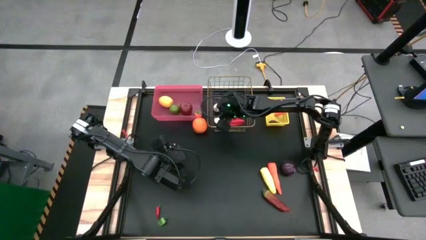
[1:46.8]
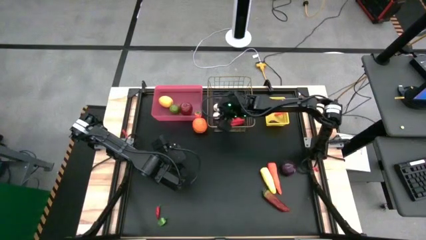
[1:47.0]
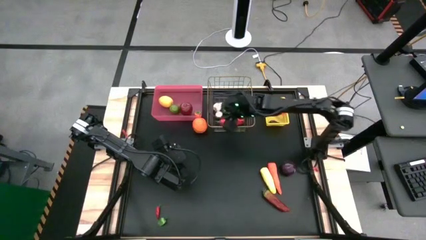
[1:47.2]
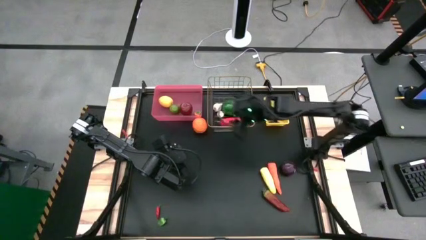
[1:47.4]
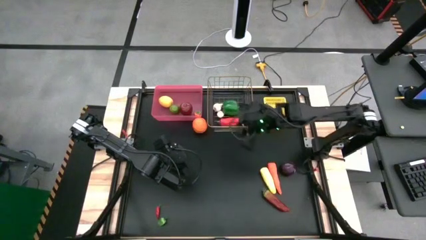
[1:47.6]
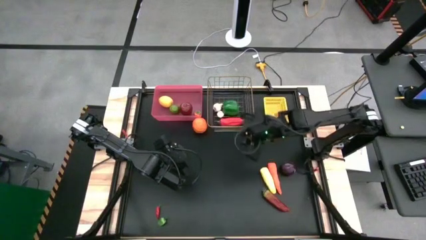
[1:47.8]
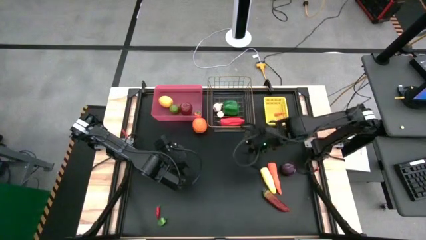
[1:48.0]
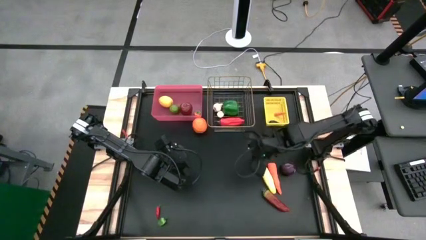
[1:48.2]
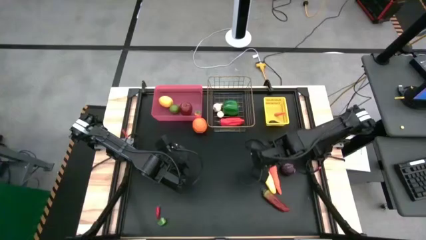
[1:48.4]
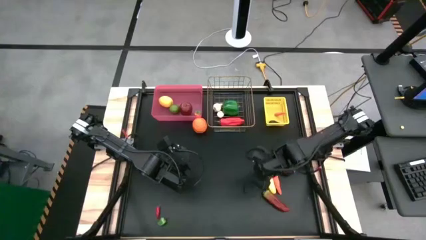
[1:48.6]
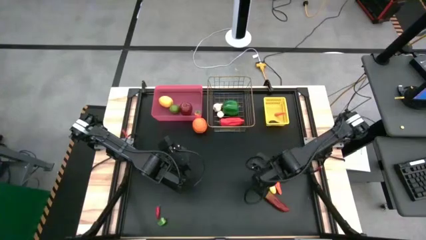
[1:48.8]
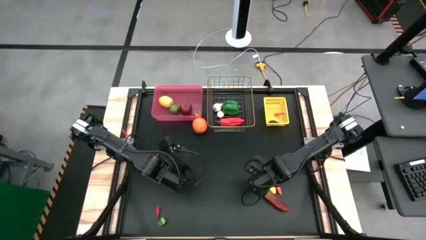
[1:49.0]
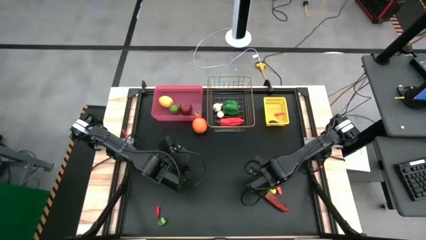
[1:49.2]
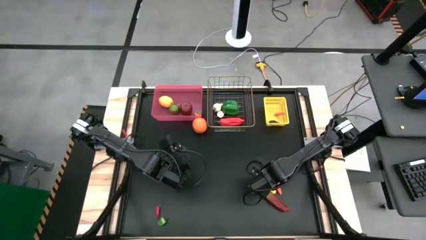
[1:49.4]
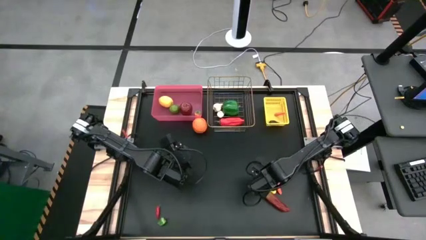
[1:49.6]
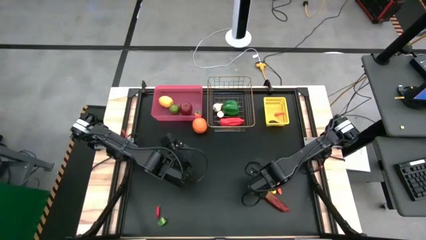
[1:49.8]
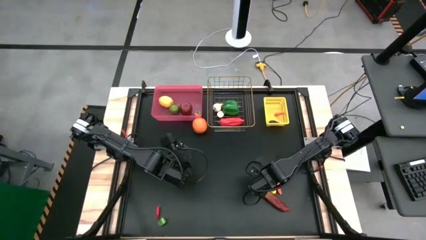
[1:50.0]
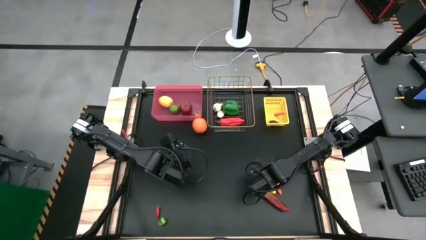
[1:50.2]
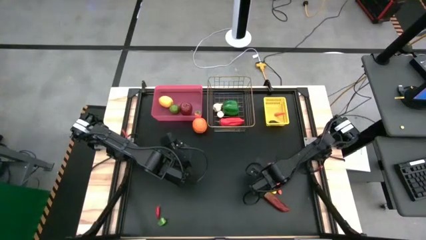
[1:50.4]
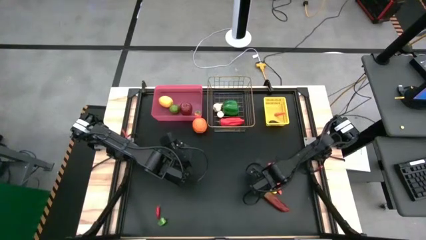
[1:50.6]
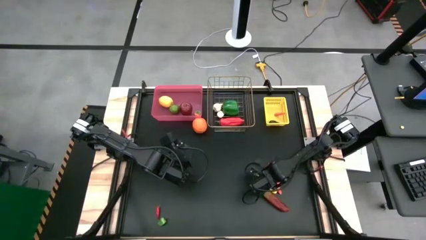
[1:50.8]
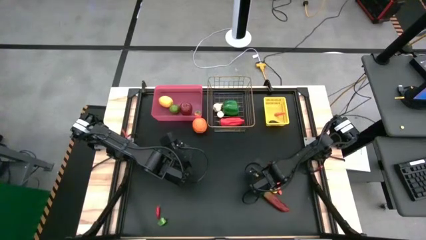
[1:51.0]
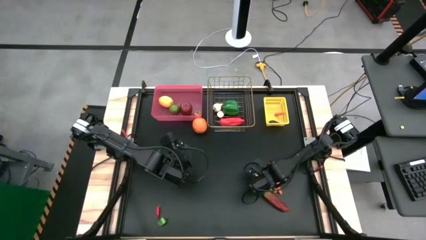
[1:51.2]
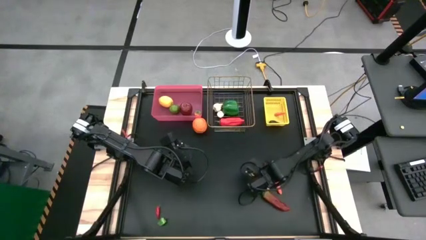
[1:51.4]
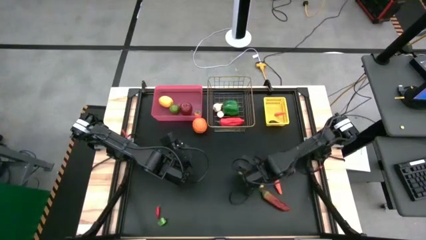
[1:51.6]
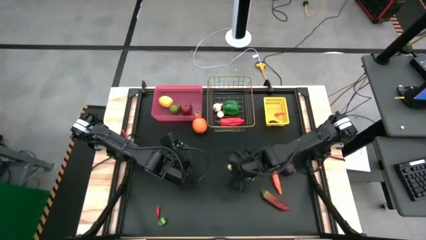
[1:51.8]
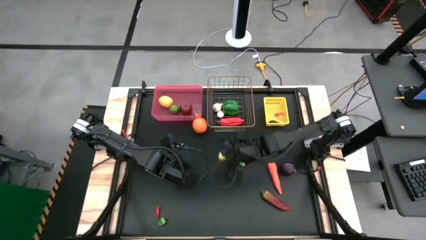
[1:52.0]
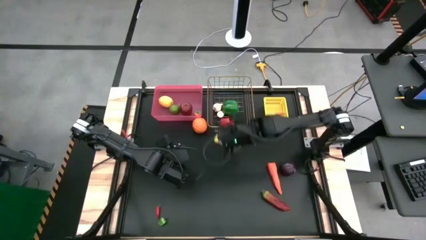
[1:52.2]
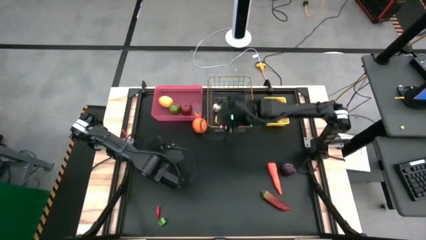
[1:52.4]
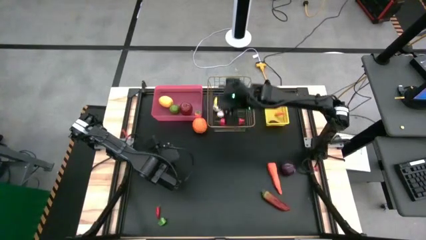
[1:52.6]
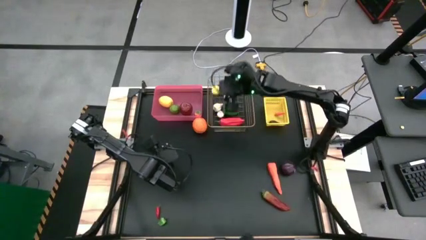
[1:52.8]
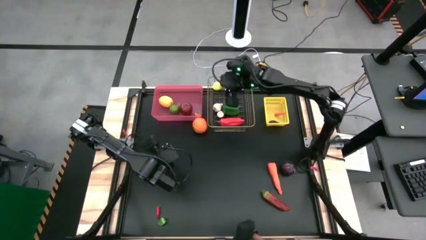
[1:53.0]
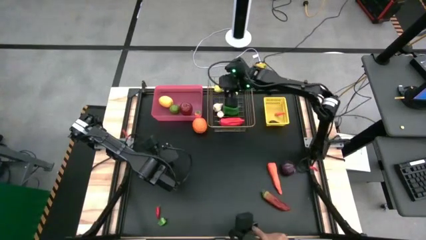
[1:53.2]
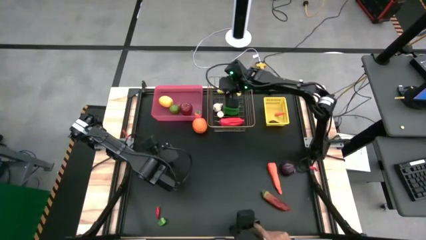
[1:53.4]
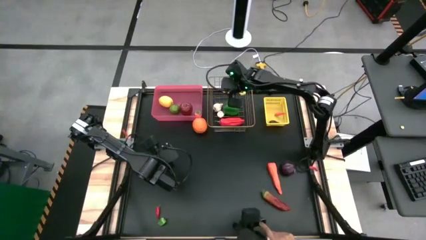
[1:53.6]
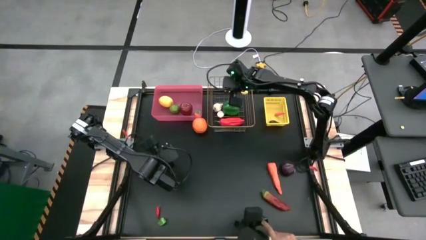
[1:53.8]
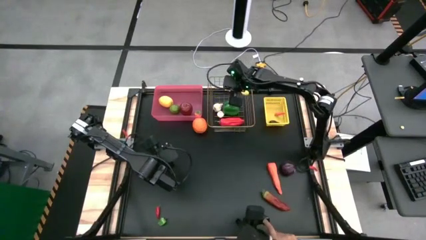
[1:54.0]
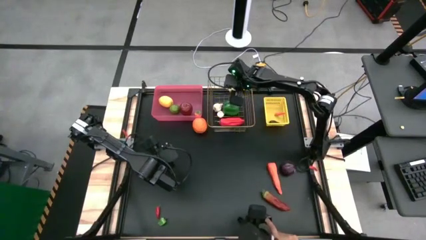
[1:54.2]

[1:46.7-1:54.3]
Task: Sort produce into baskets
Put the yellow corn into the gold mesh basket

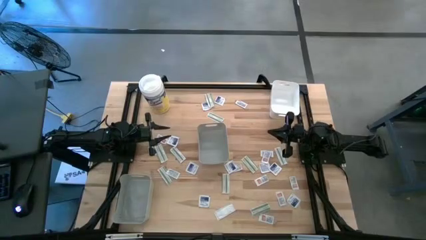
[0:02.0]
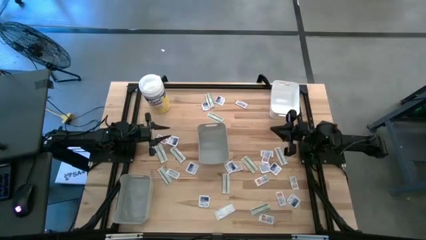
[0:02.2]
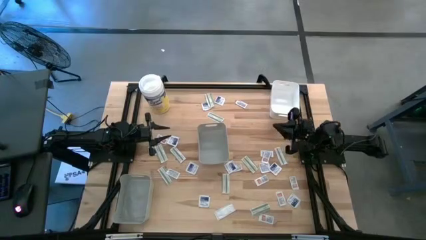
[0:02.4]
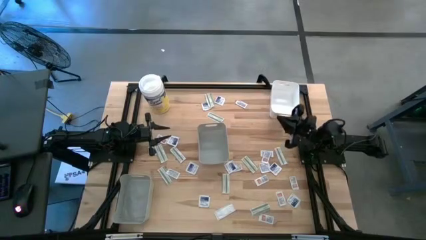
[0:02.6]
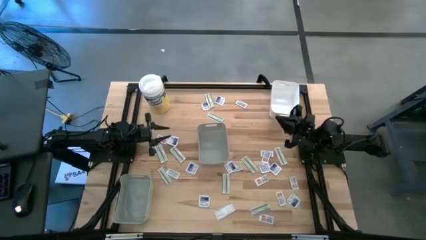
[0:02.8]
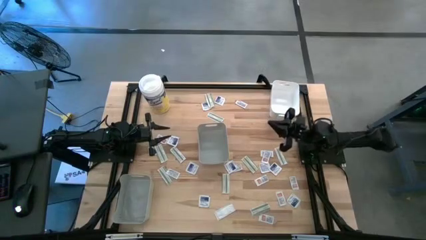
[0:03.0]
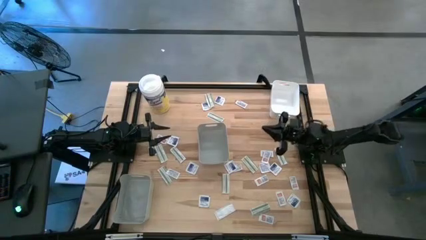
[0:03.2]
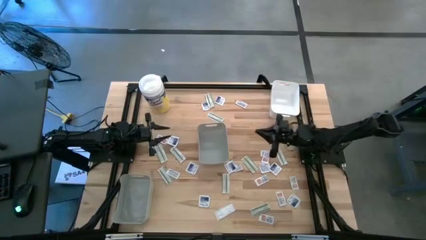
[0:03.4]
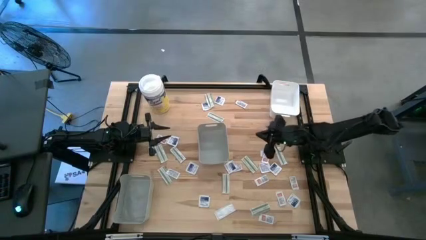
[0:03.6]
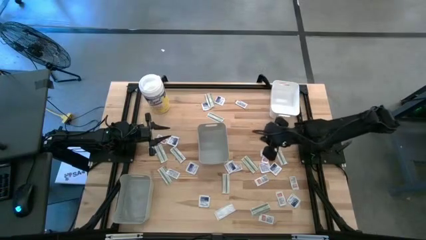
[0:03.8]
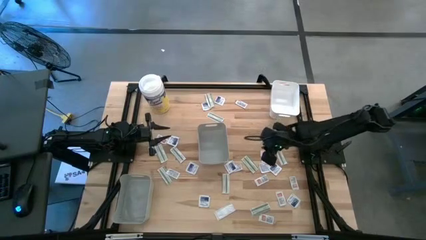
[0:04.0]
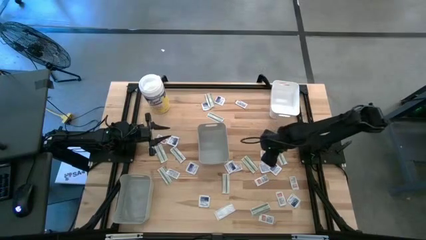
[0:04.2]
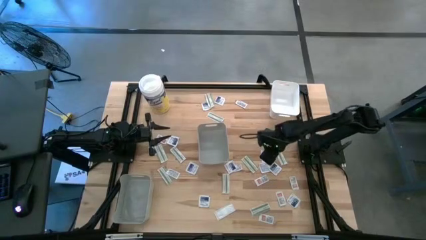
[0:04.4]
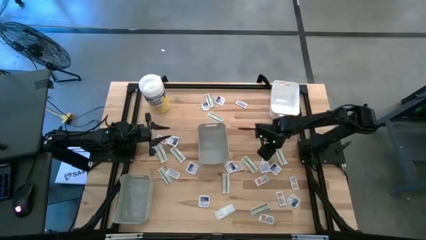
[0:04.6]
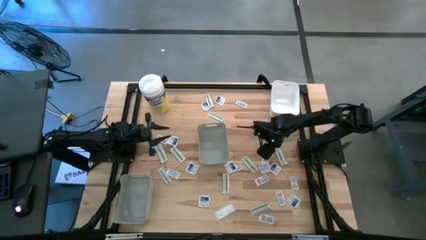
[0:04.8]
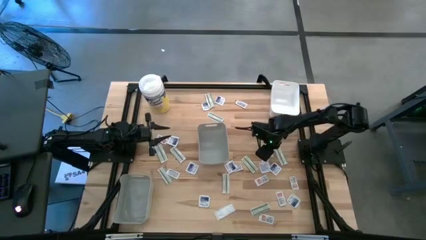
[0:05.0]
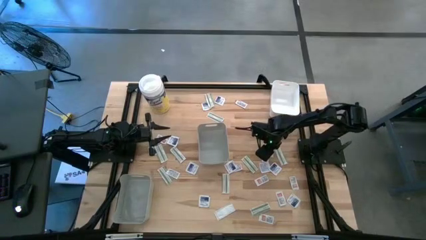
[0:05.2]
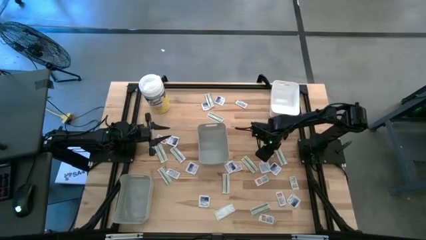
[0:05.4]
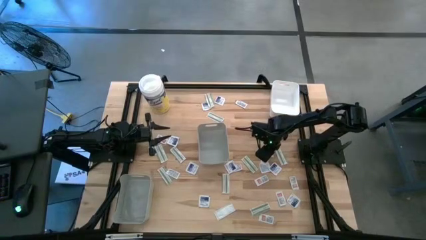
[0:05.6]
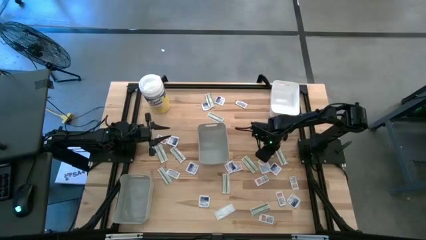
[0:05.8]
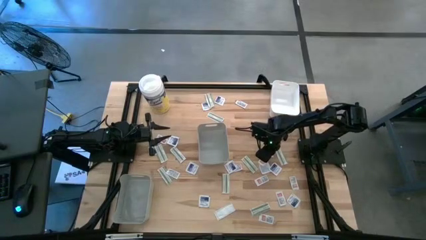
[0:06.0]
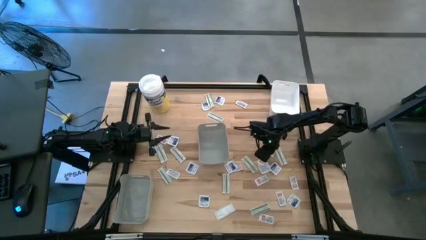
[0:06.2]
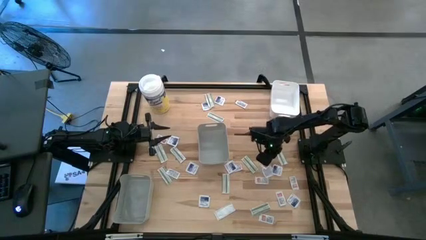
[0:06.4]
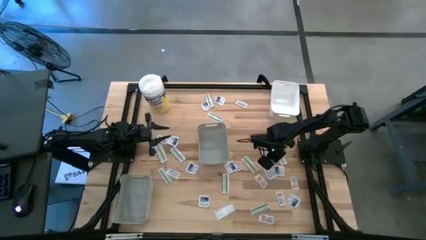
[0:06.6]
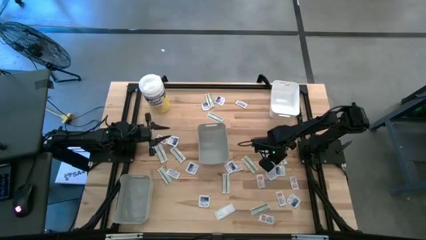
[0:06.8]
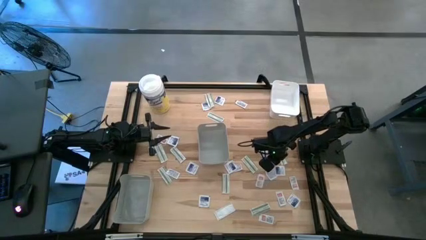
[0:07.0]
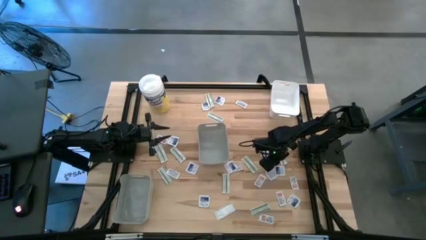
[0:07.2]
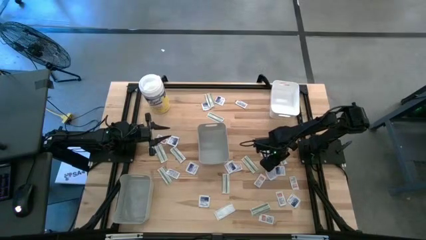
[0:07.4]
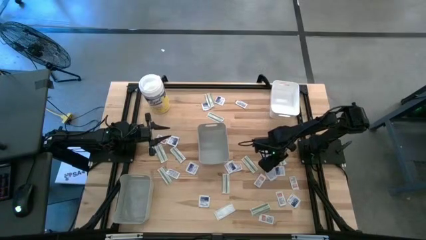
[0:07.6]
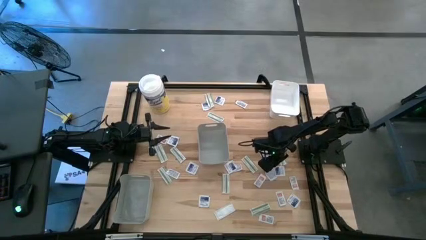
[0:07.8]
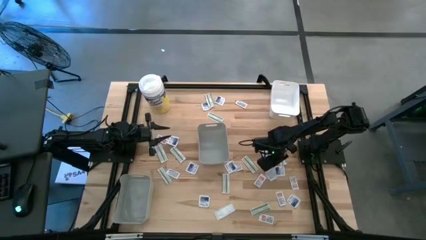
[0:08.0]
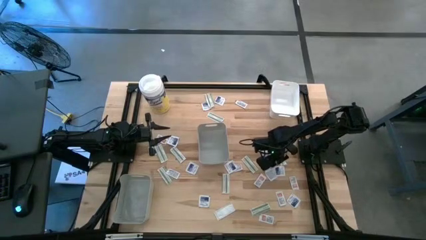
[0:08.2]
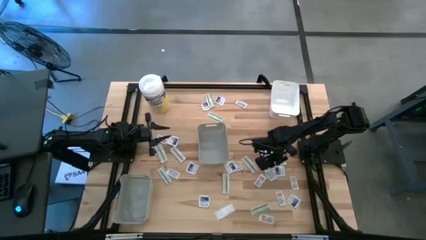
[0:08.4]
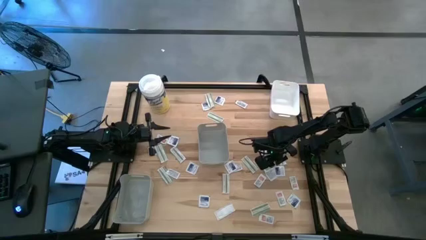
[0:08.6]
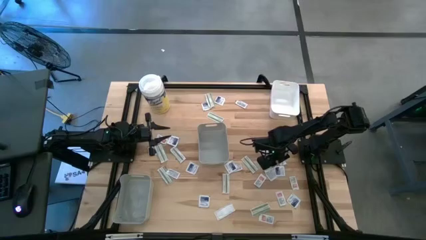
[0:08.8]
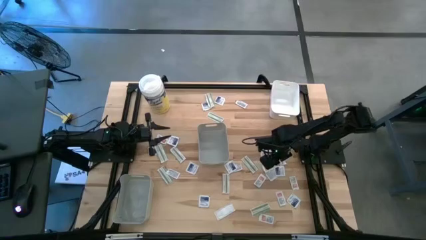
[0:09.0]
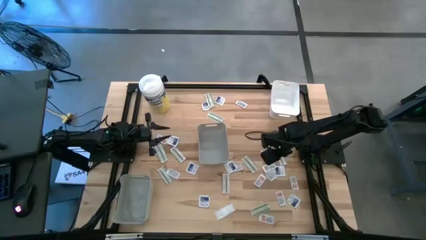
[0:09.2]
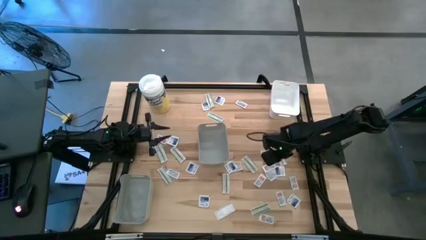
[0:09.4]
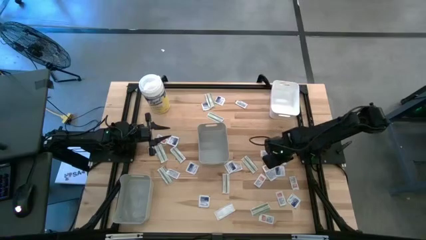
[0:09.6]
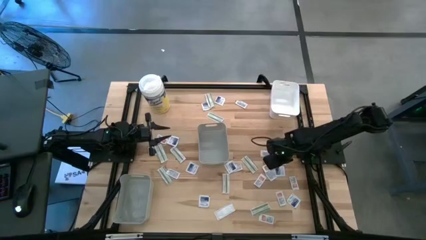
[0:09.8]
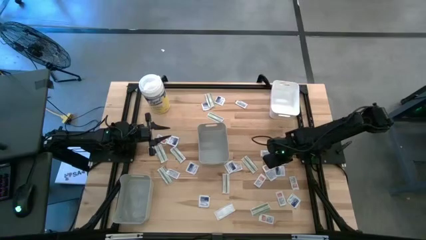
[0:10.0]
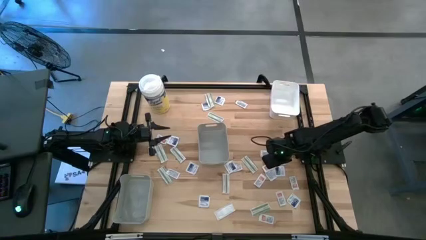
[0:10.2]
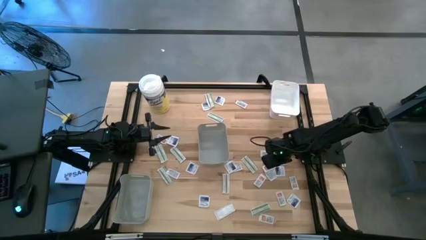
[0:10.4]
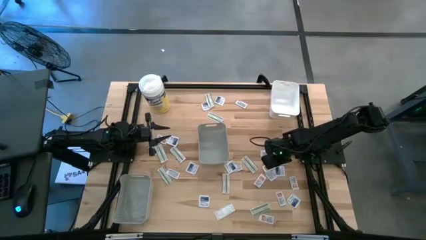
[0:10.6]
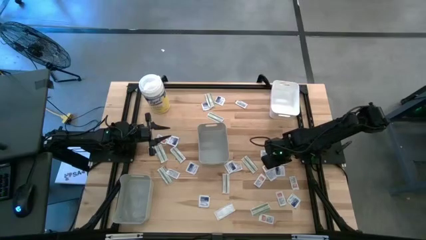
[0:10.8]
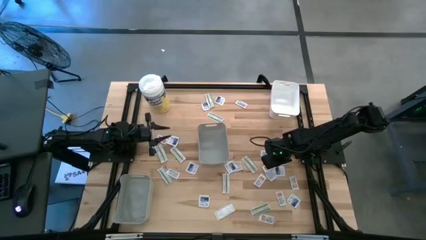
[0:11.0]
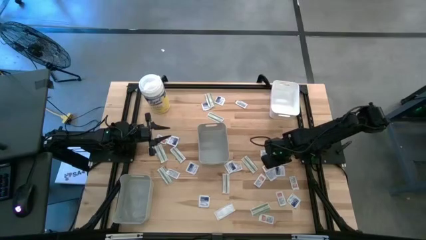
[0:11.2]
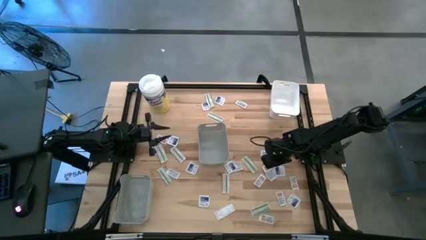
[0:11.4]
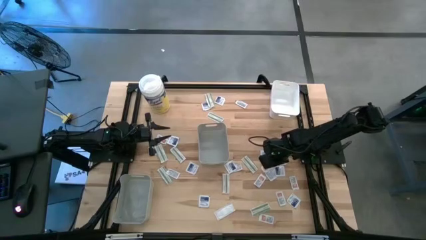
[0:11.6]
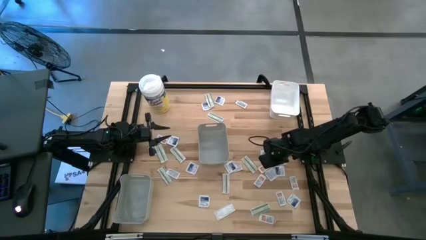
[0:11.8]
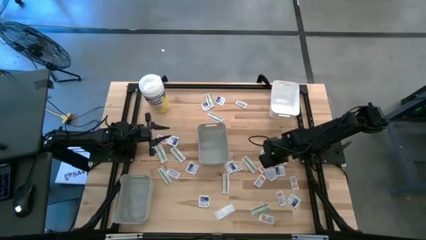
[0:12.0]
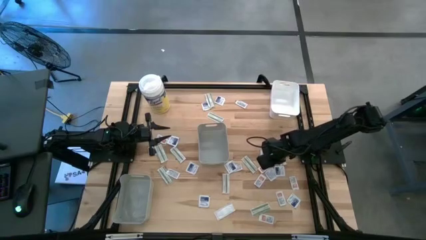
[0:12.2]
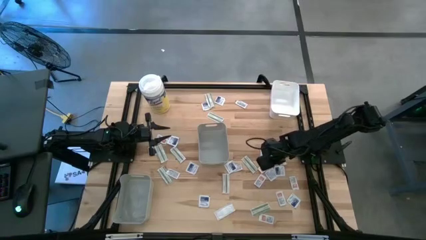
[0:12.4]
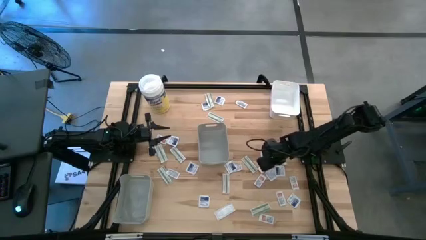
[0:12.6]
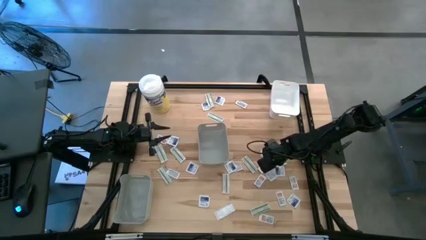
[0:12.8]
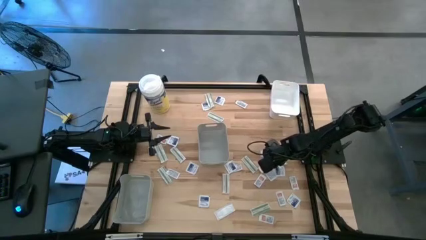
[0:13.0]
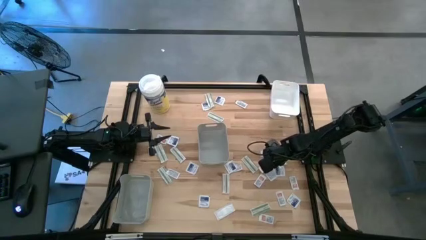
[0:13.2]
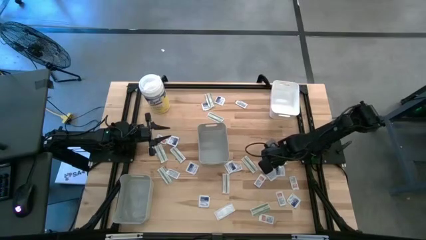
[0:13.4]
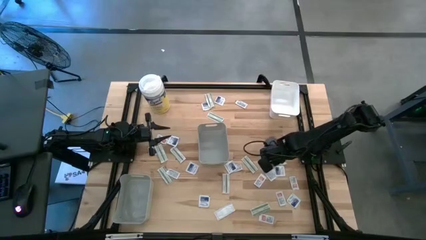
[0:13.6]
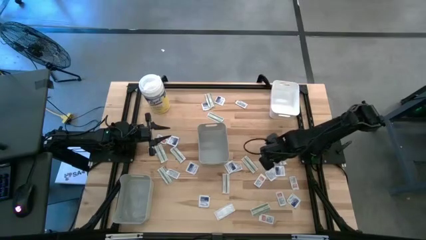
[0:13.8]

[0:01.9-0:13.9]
Task: Pick & Place First Aid Supplies
Put the orange pad into the white bin
